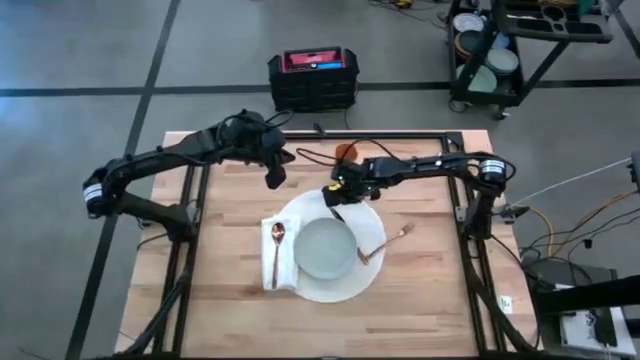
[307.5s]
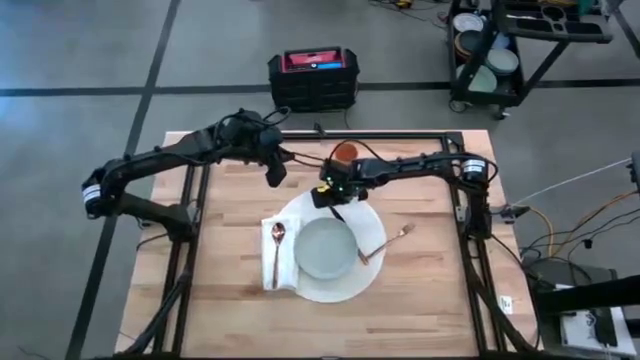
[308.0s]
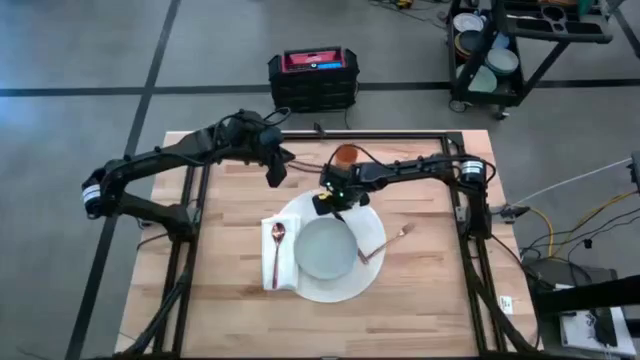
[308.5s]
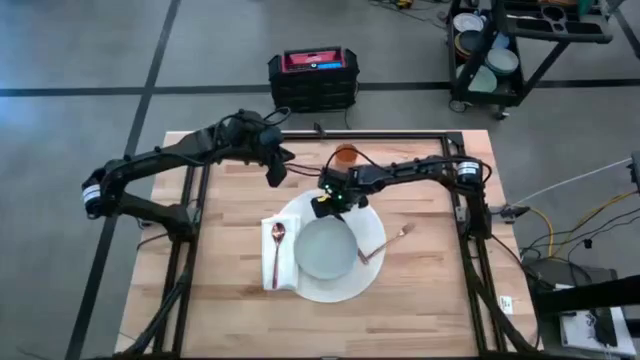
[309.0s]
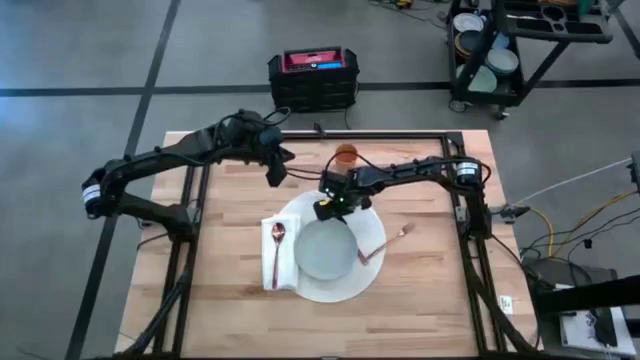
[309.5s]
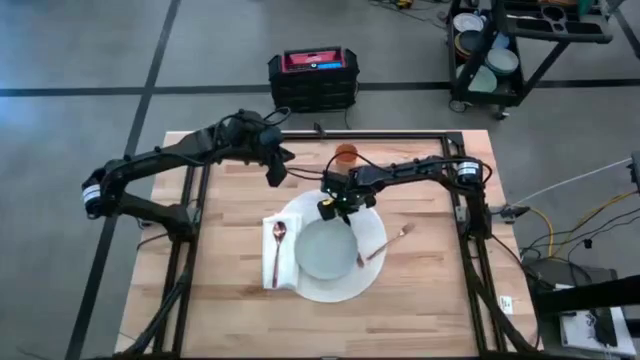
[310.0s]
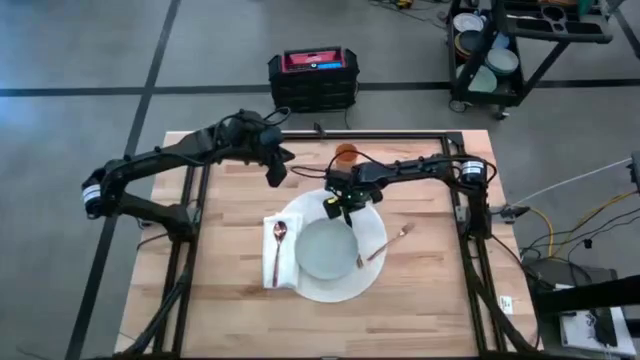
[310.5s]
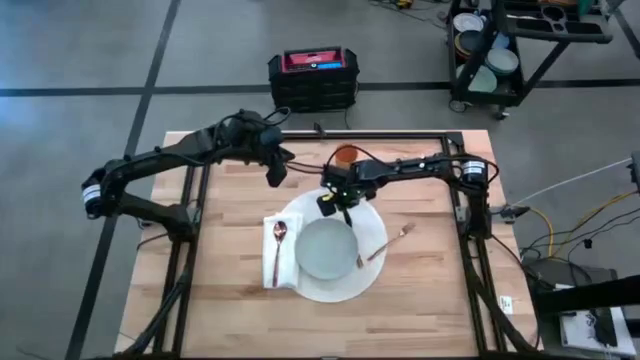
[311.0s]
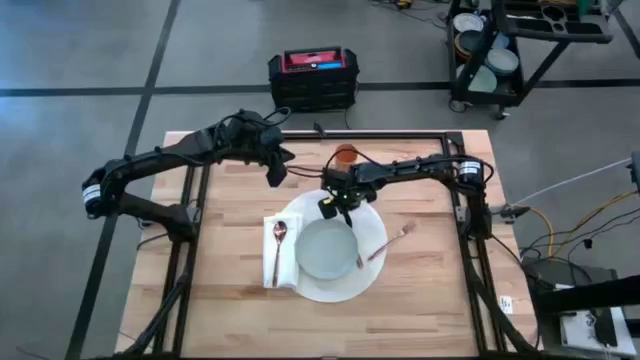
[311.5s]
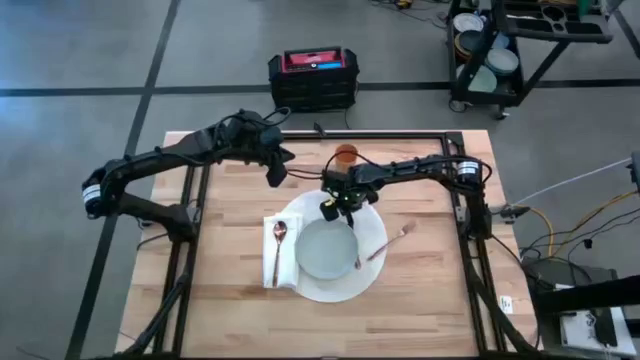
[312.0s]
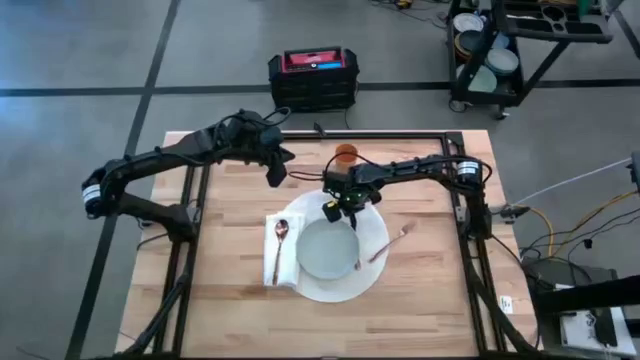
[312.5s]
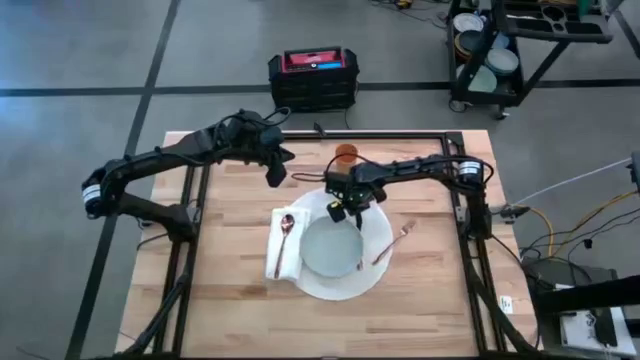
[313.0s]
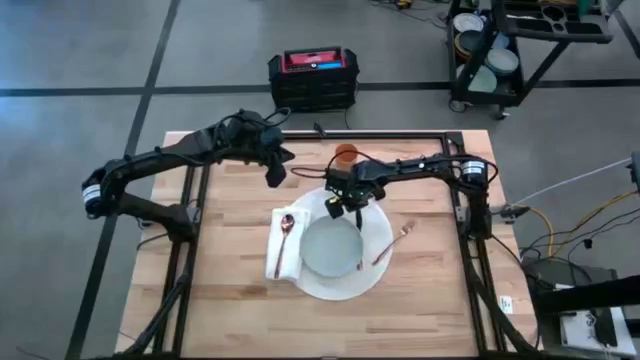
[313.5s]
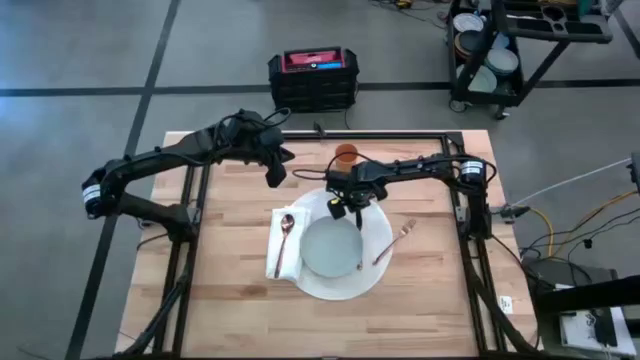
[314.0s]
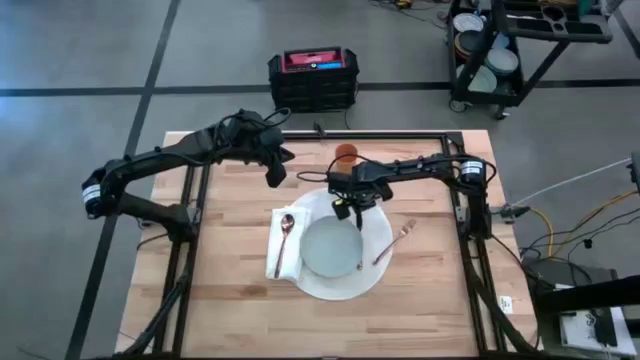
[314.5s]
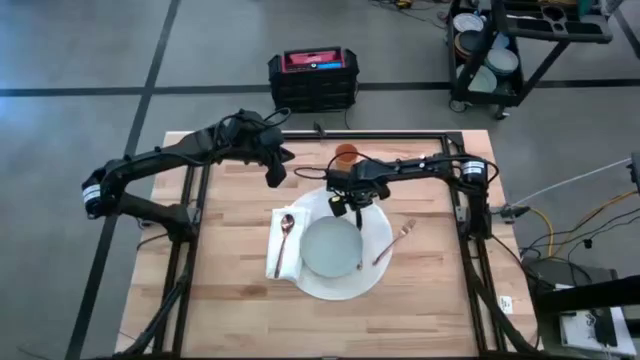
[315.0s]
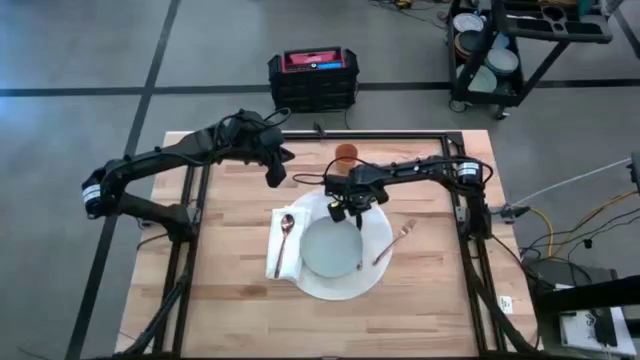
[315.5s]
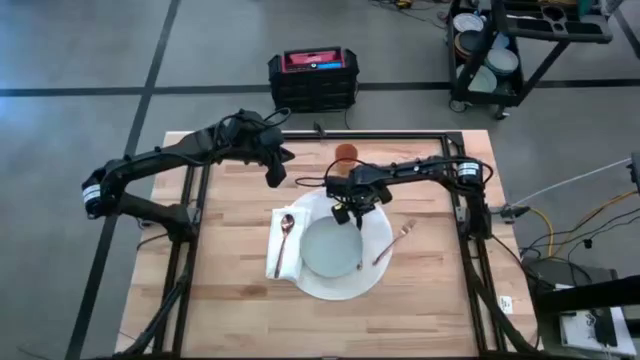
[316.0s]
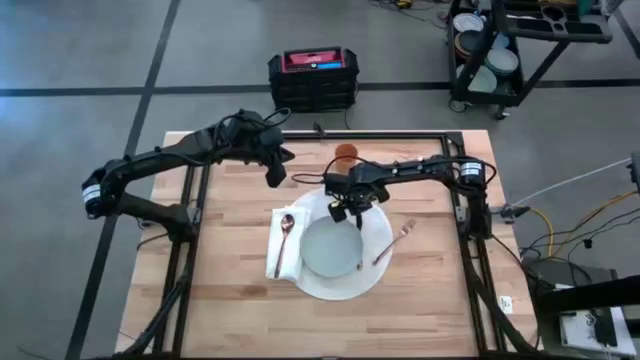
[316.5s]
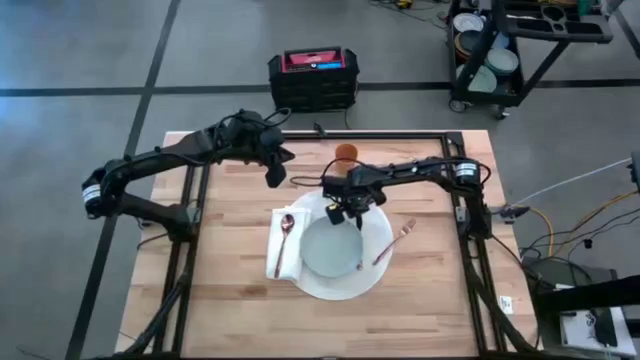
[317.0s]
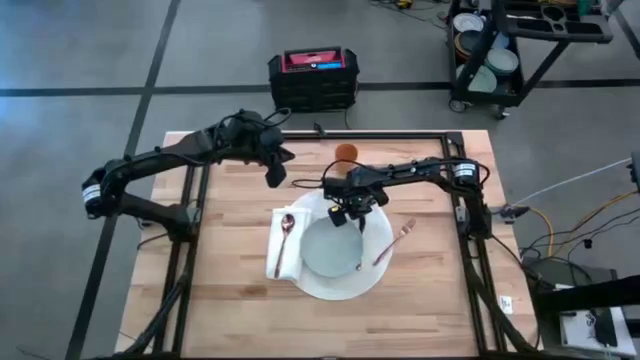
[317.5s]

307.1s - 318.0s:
Task: Set table place
Adjust the gold knife on the white mat

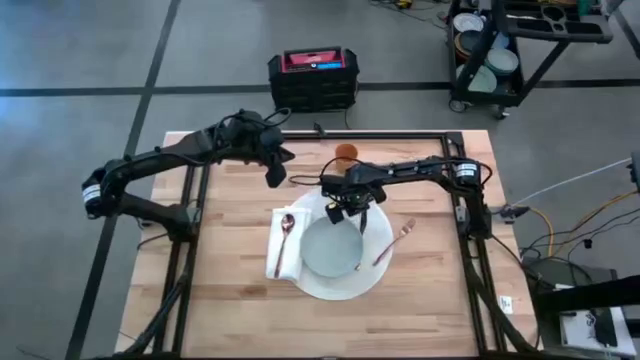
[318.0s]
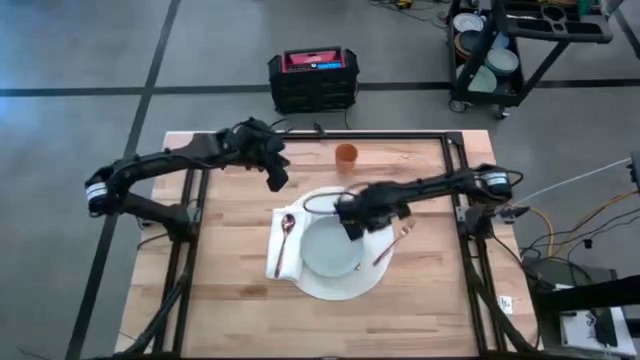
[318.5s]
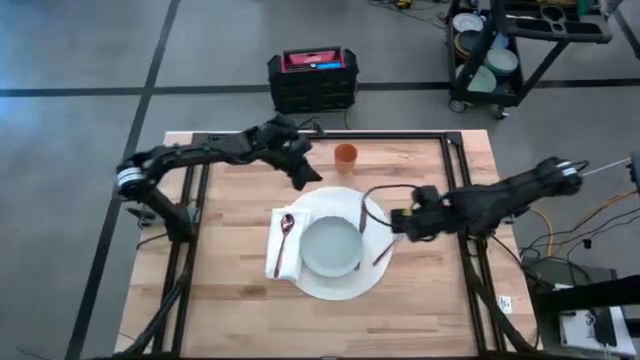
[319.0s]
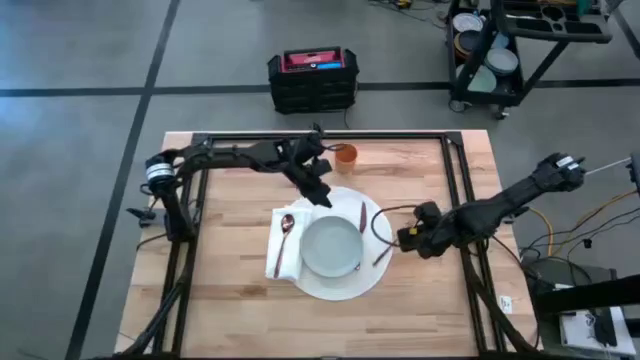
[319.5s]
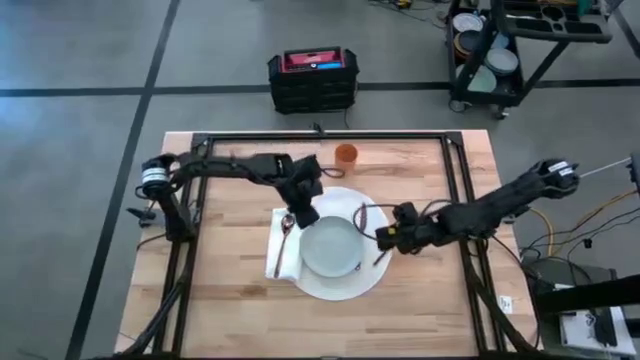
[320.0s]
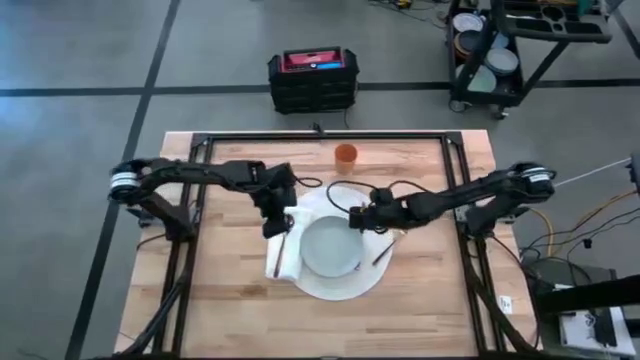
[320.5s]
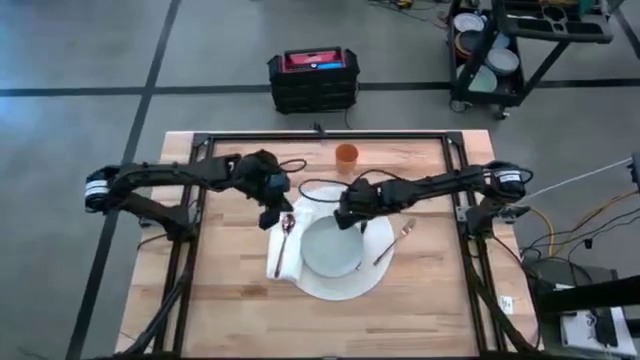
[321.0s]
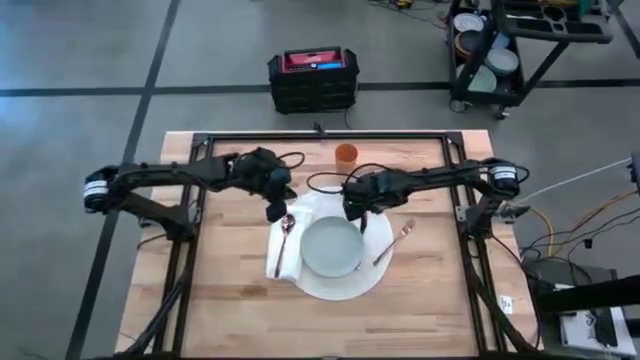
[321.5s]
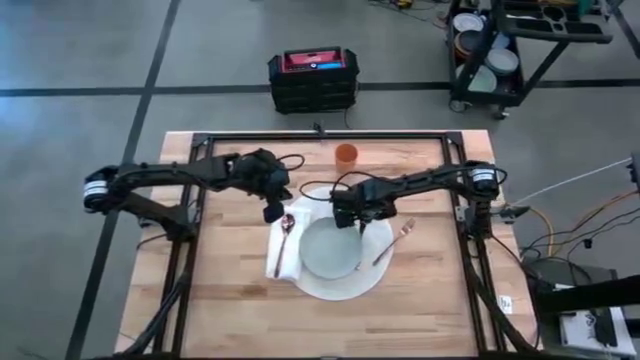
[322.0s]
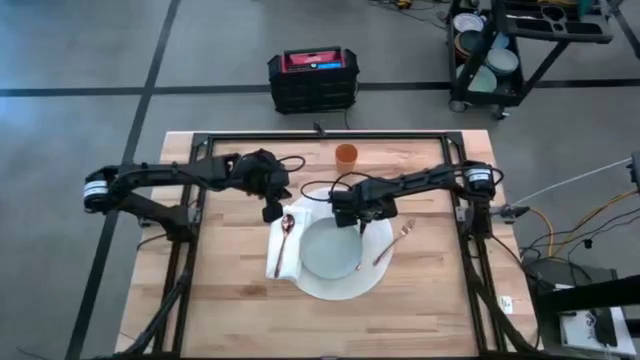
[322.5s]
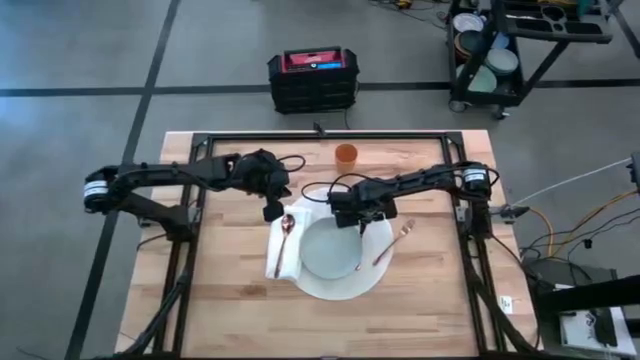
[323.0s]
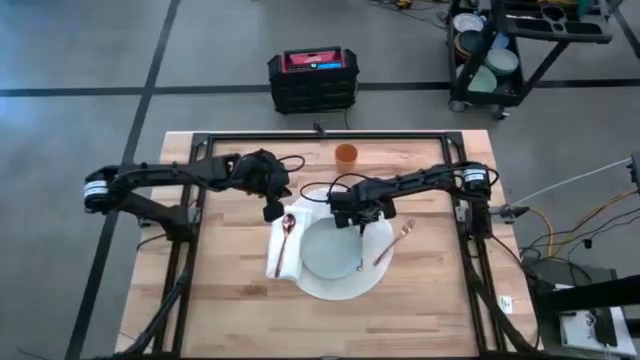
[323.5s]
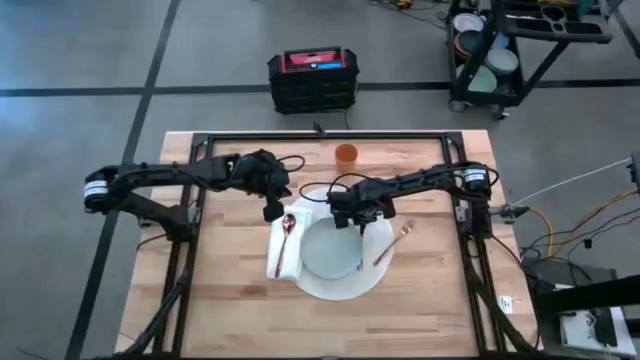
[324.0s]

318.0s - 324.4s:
Adjust the gold knife on the white mat

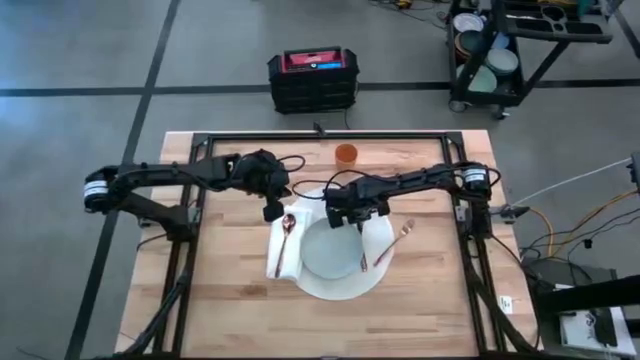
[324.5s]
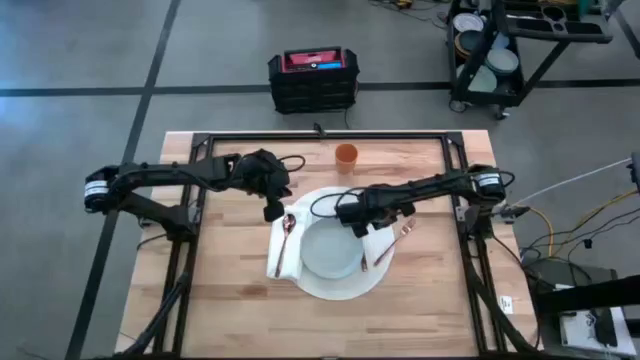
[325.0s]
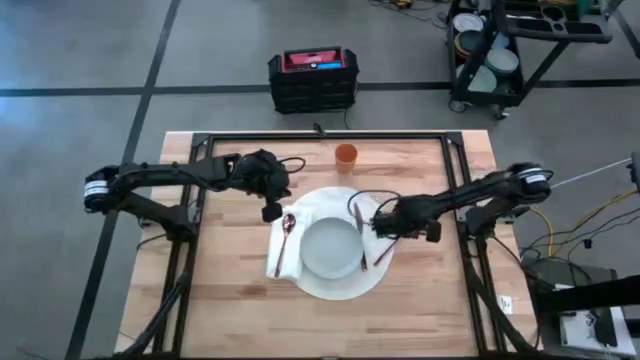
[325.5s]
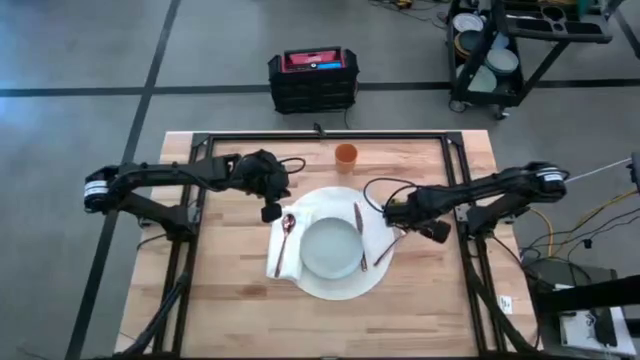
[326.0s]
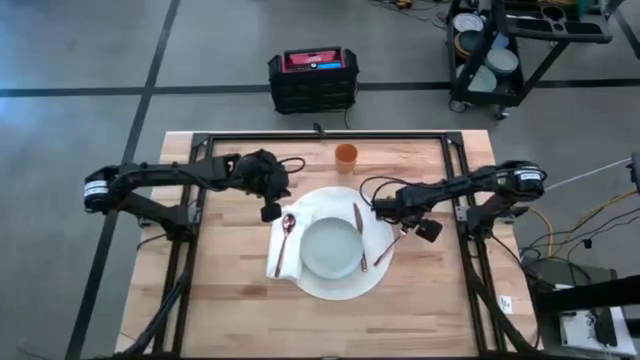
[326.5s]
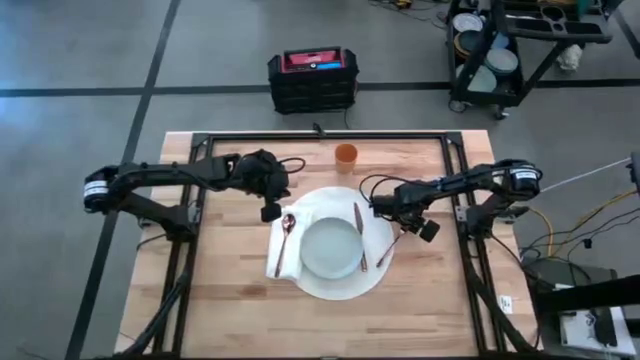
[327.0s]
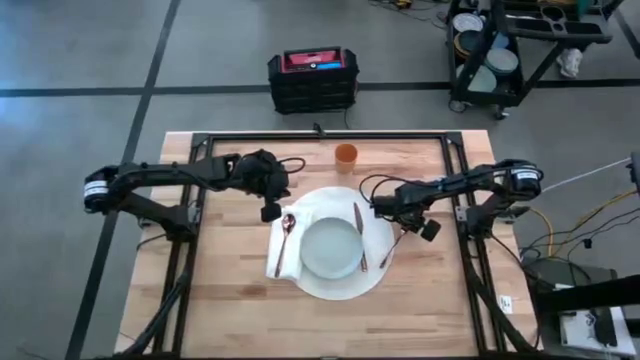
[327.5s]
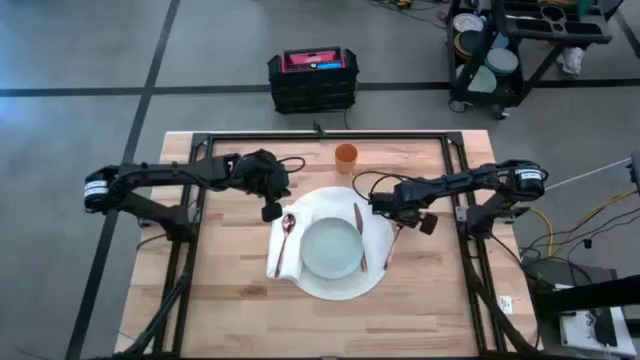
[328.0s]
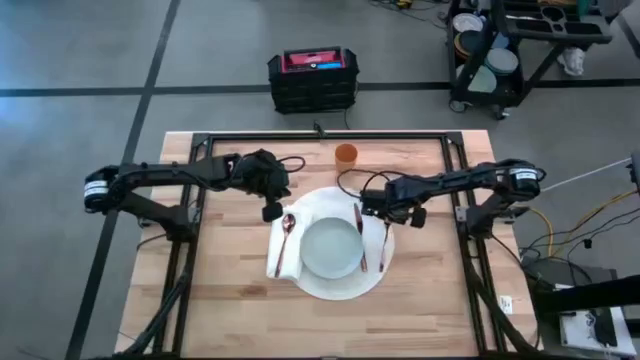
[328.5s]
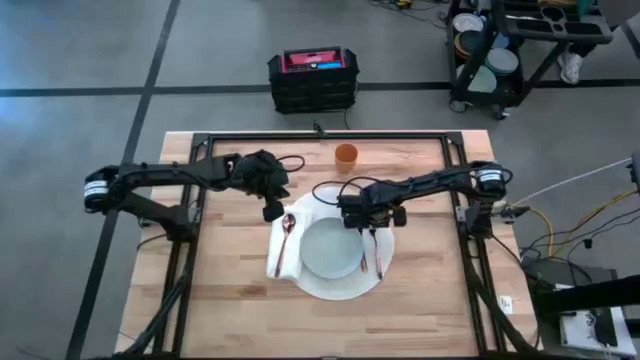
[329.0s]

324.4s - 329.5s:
Adjust the gold fork on the white mat
